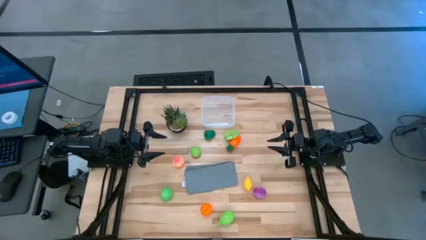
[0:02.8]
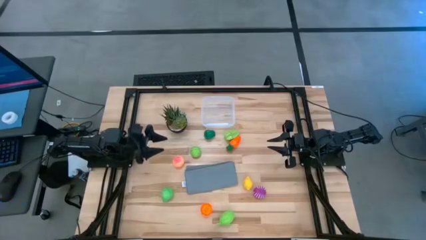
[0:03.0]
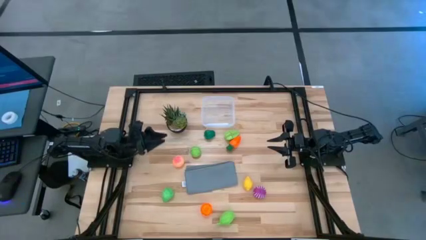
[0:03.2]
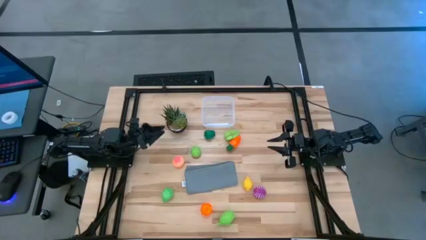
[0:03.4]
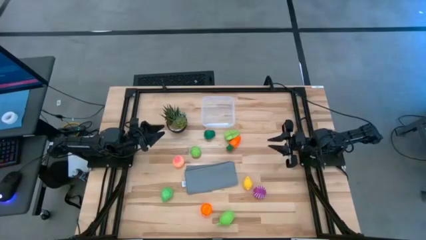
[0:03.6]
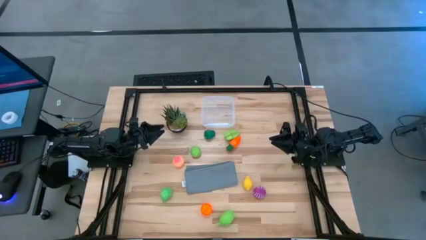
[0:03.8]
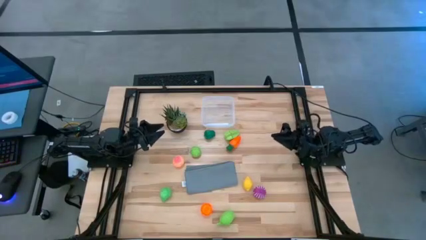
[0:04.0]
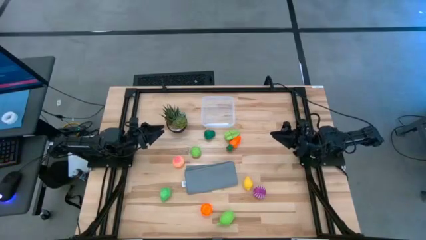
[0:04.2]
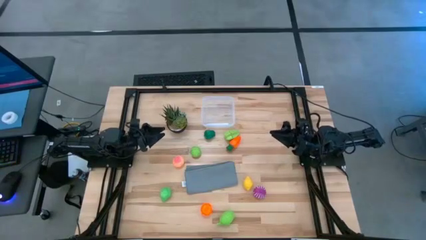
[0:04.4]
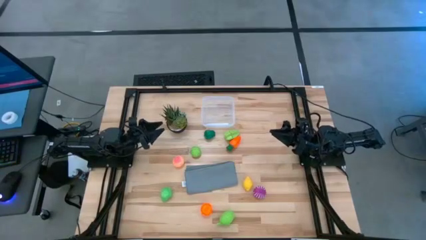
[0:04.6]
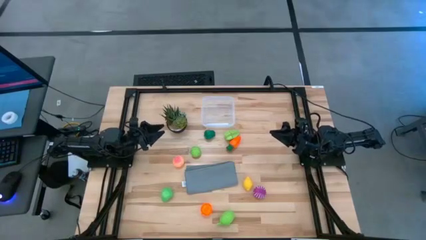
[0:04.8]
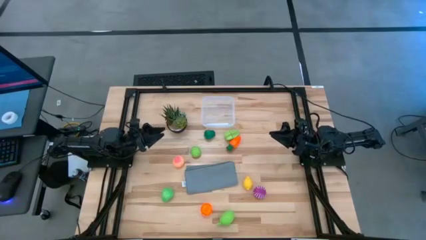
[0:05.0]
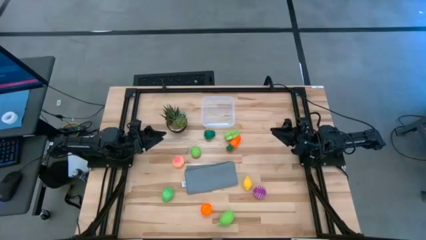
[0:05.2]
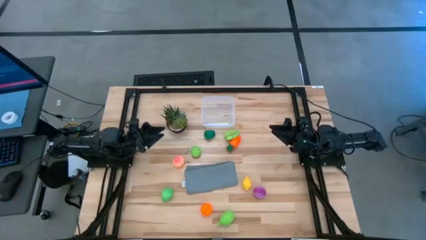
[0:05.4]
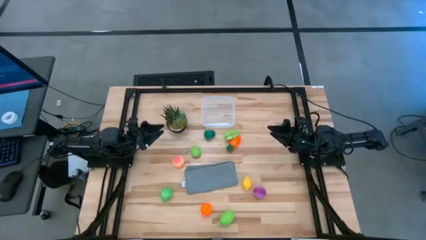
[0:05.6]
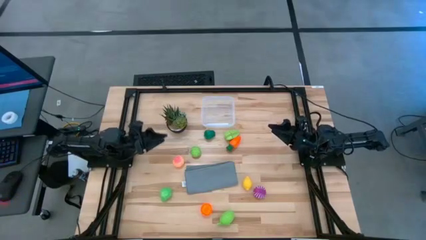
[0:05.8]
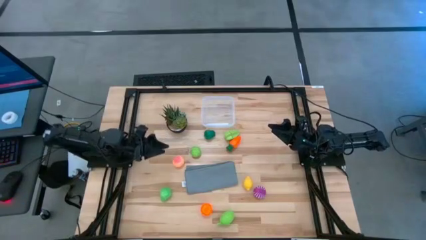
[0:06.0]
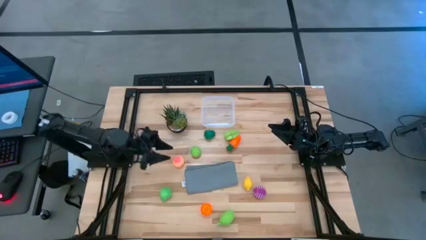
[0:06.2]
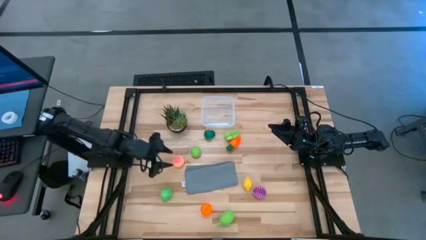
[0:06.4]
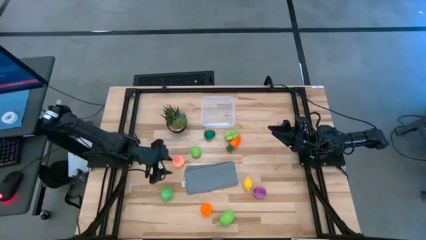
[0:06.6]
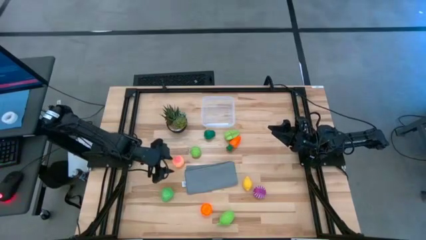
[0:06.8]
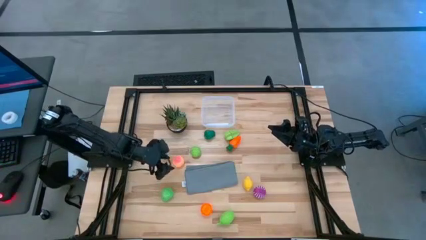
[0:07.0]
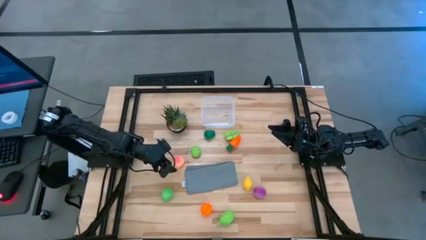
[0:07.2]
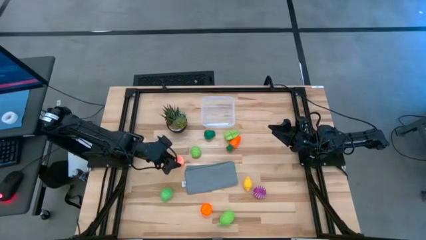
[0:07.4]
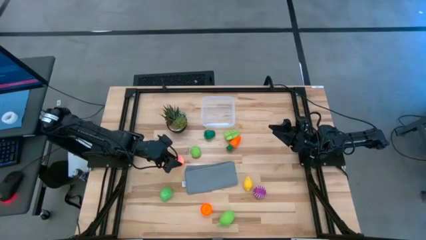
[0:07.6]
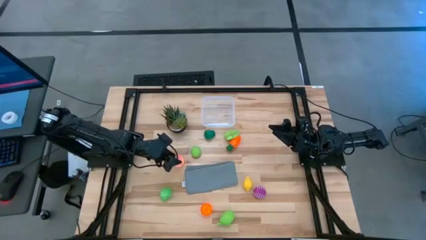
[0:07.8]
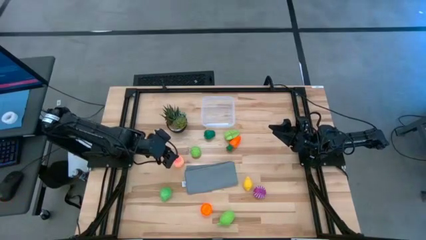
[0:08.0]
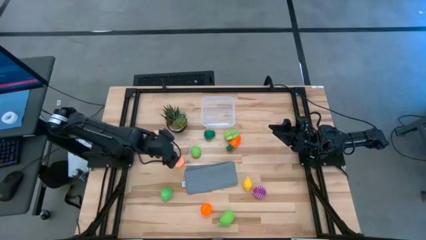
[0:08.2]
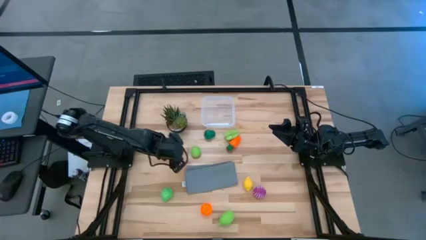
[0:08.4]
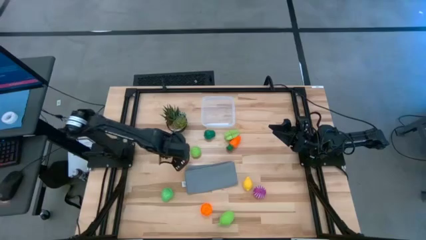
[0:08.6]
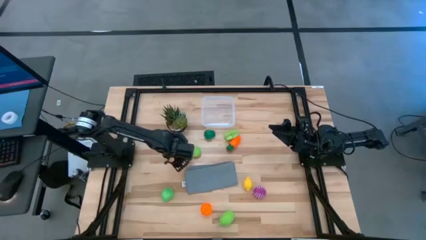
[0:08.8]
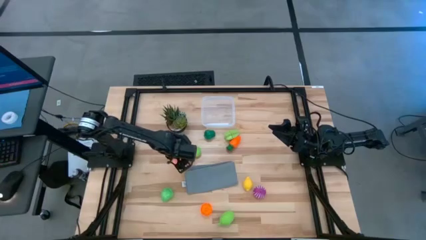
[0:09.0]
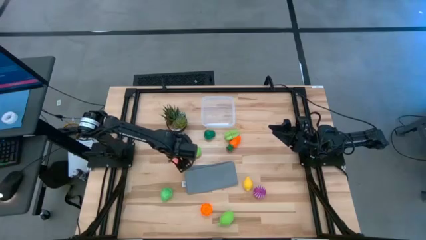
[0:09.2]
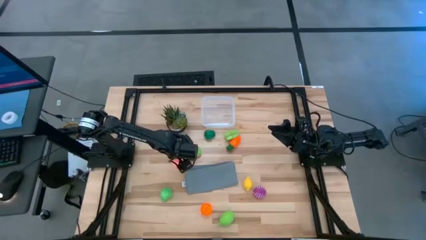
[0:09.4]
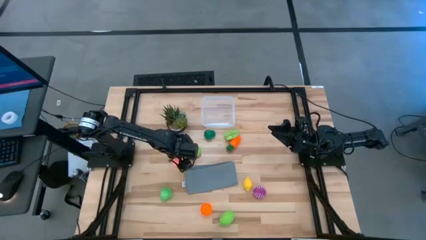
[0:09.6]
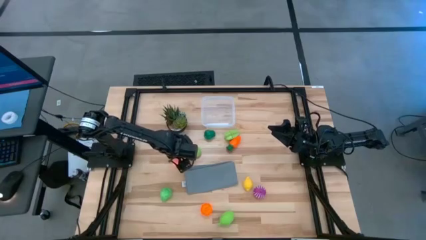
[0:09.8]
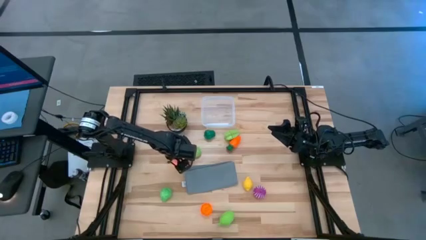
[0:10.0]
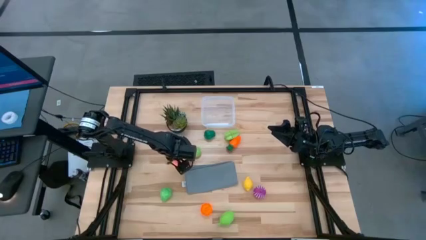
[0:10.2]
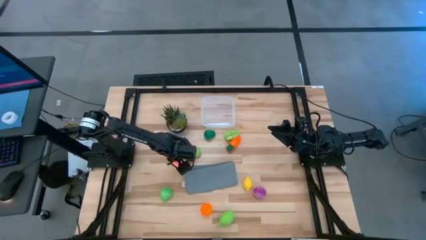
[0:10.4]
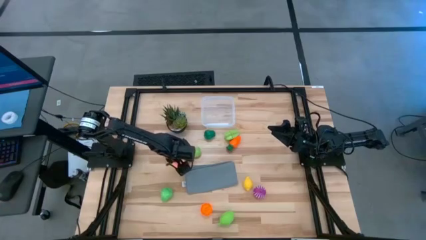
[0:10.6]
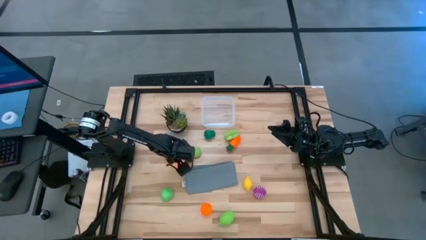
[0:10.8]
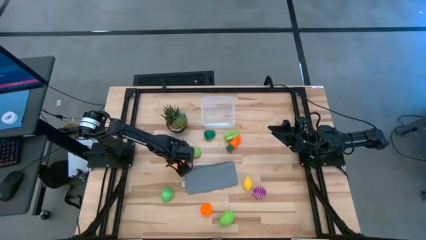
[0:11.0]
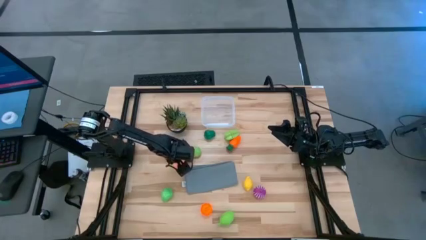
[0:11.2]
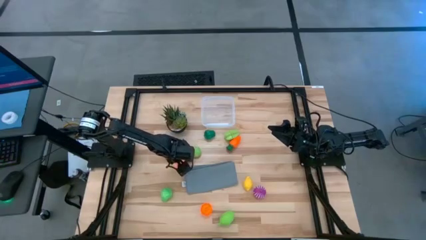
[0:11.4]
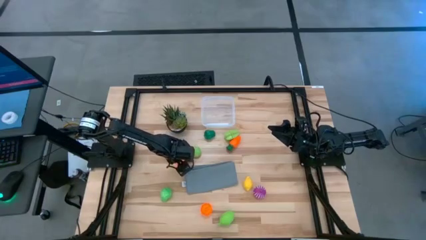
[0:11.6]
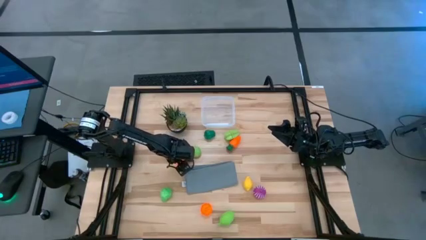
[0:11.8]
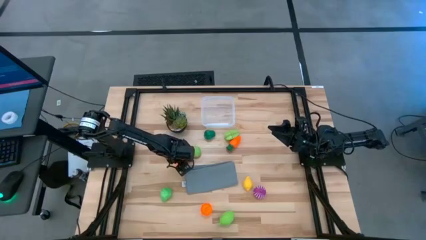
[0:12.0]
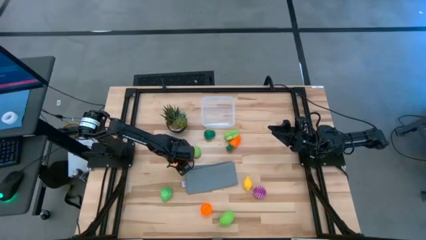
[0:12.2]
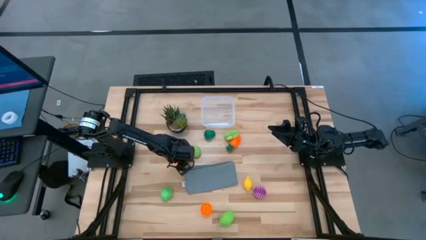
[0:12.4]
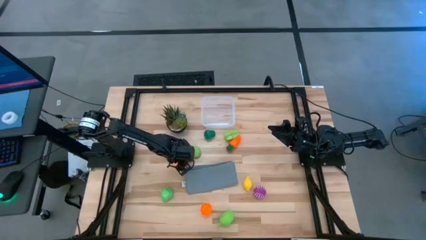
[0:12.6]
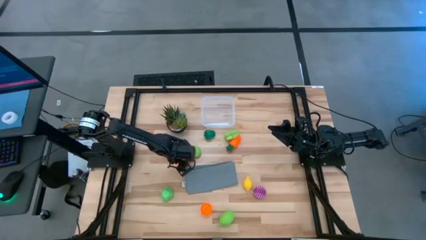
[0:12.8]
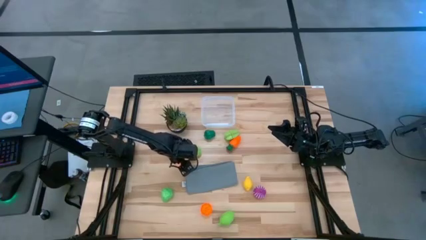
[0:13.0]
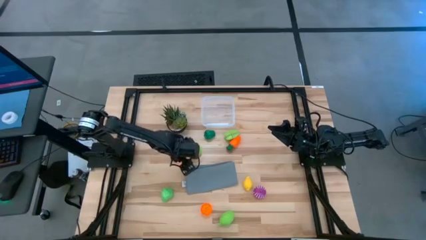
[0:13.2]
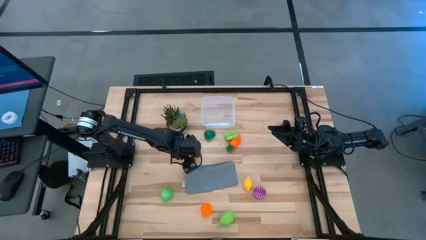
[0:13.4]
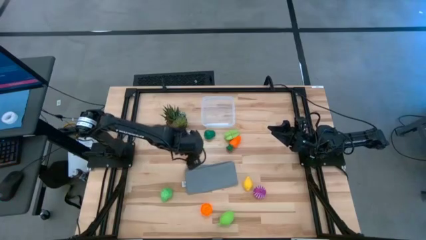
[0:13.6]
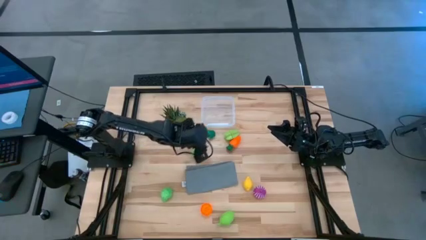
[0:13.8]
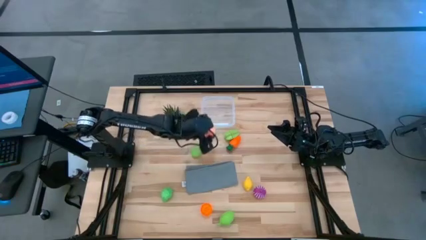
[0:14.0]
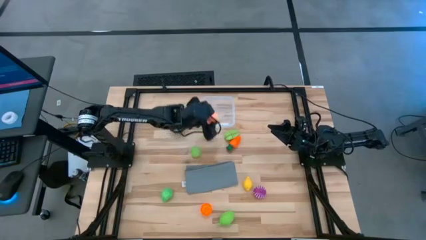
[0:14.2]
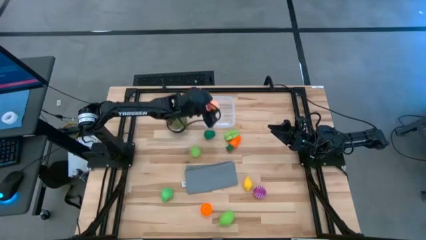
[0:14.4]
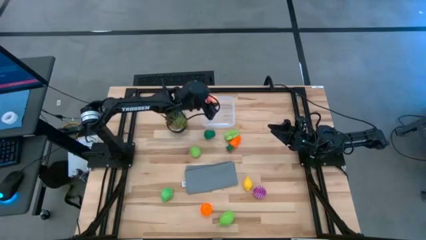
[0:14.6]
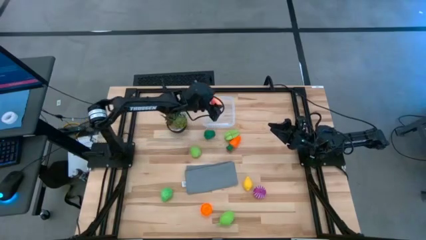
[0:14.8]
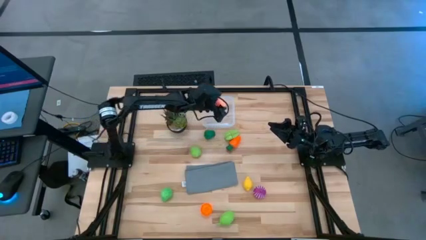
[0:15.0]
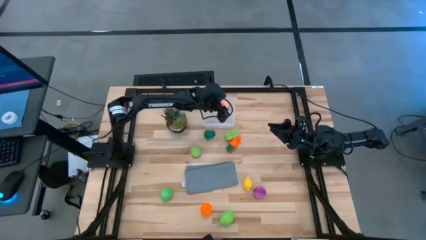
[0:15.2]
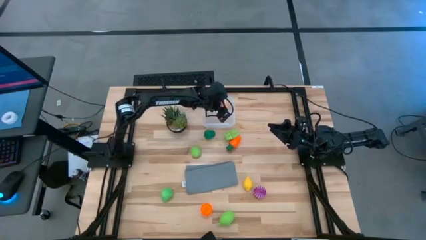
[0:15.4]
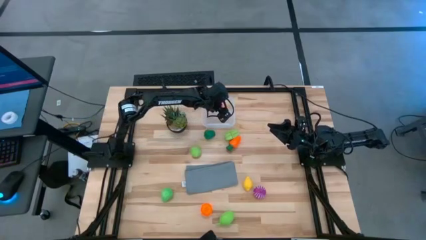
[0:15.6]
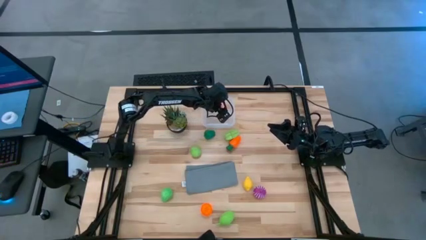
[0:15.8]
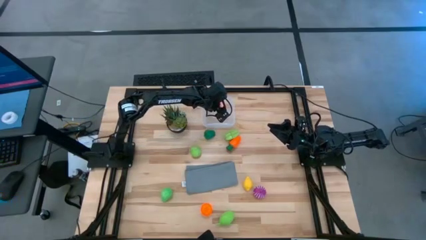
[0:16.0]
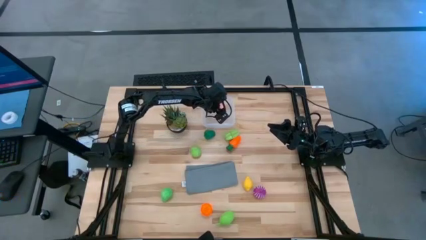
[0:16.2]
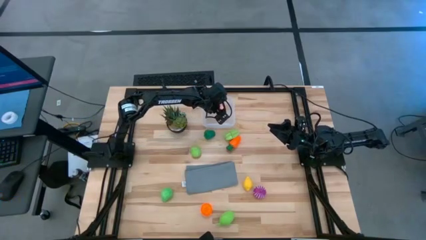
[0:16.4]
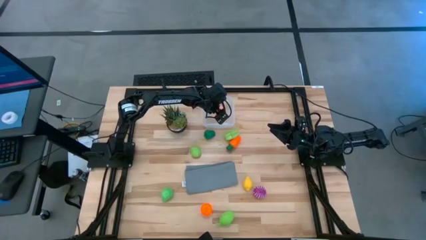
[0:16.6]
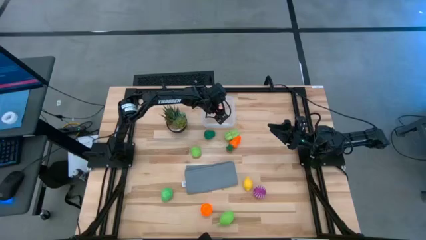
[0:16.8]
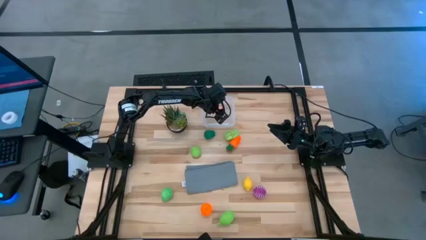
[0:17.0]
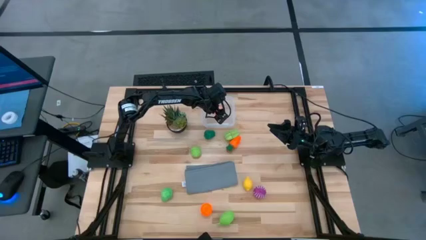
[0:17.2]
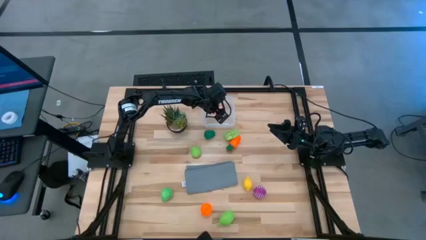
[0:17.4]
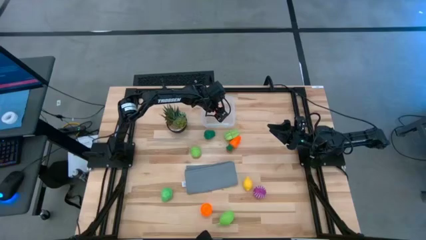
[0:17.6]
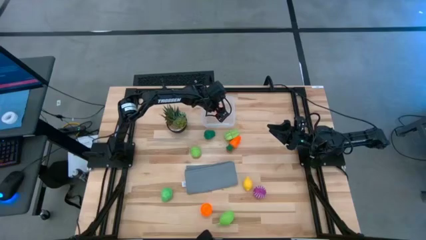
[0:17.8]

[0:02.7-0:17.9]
Task: Pick and placing Produce into tupperware
Put the apricot into the bin
